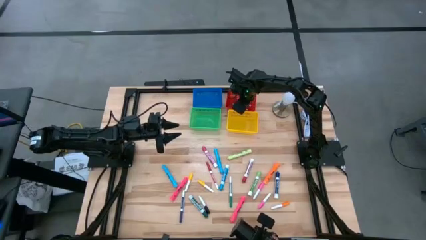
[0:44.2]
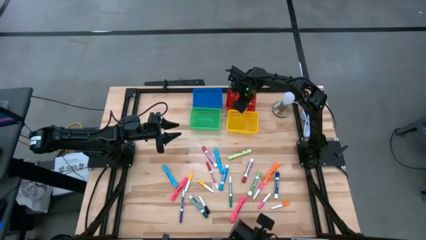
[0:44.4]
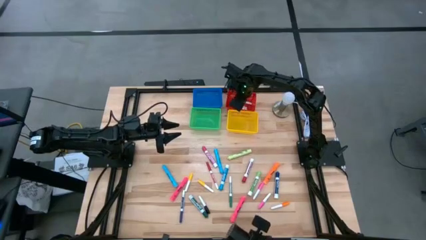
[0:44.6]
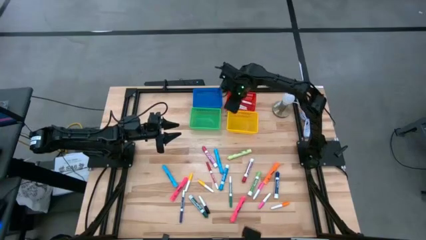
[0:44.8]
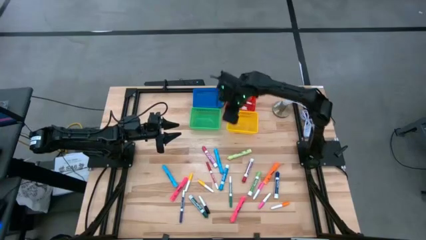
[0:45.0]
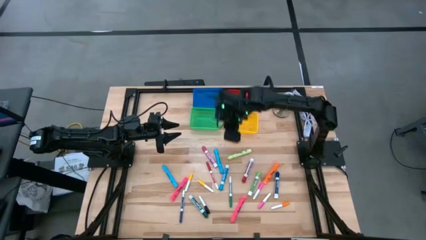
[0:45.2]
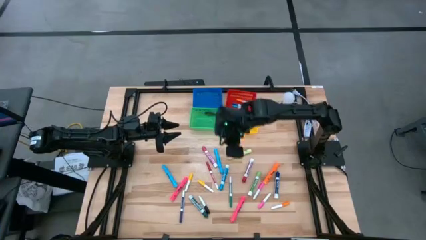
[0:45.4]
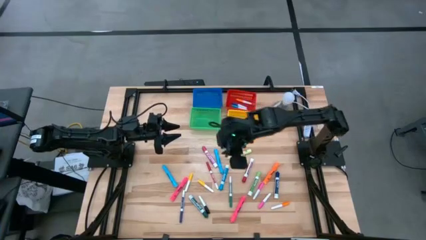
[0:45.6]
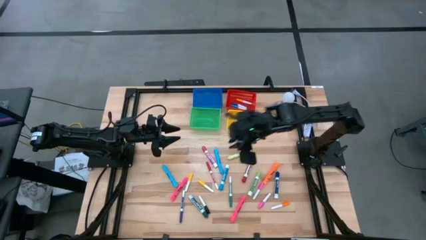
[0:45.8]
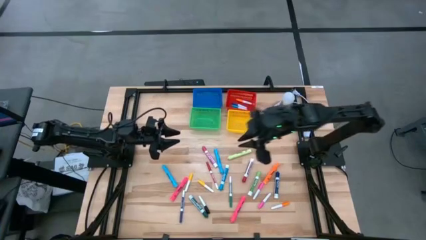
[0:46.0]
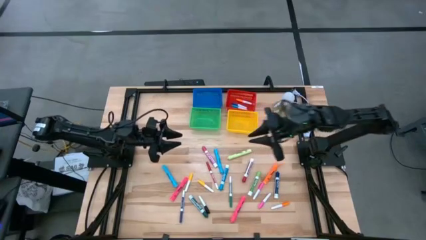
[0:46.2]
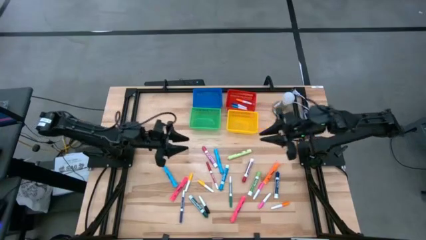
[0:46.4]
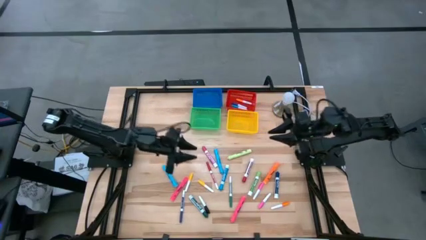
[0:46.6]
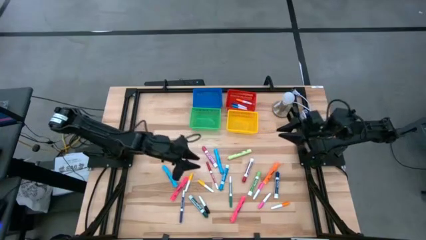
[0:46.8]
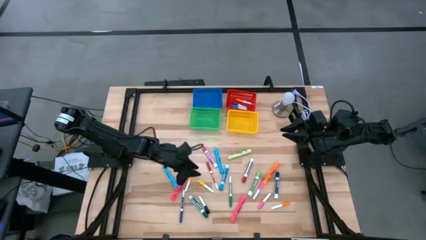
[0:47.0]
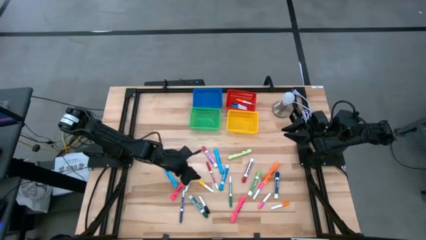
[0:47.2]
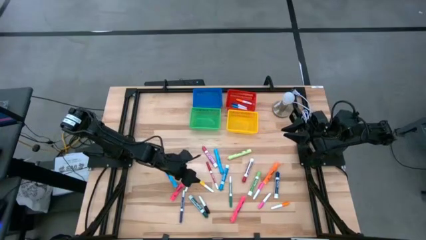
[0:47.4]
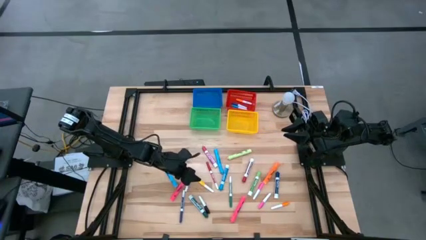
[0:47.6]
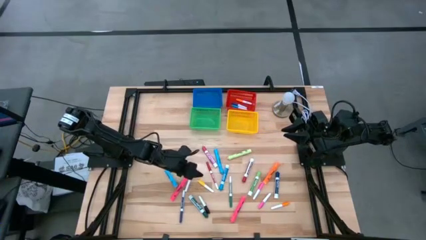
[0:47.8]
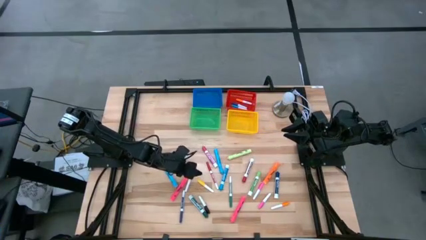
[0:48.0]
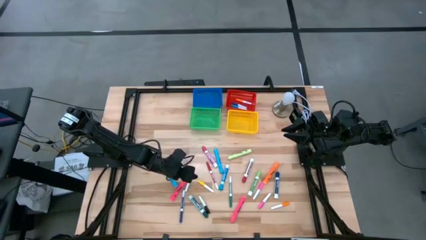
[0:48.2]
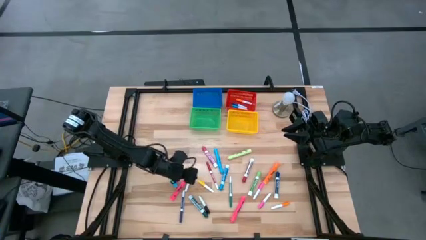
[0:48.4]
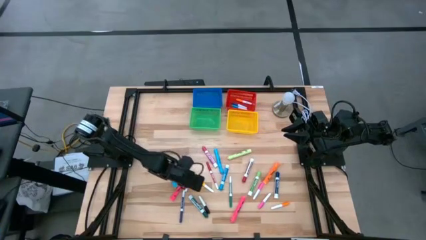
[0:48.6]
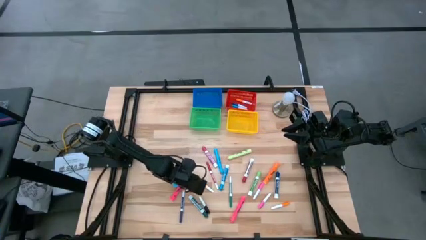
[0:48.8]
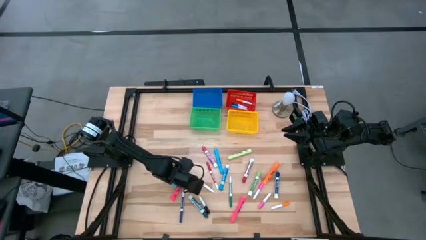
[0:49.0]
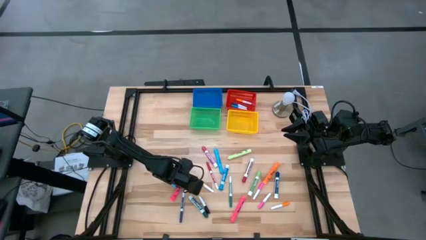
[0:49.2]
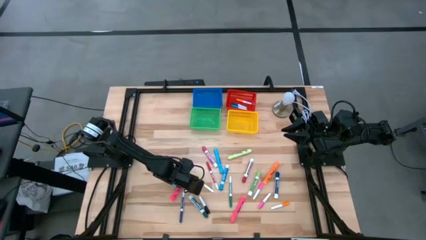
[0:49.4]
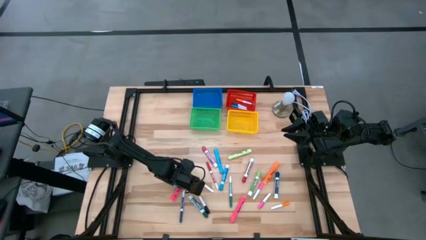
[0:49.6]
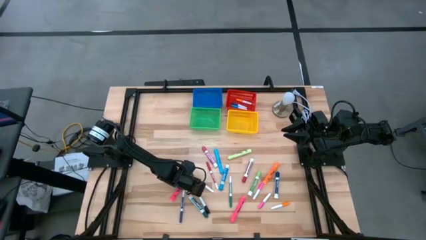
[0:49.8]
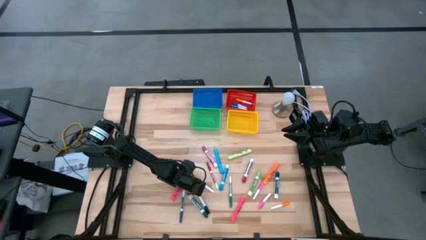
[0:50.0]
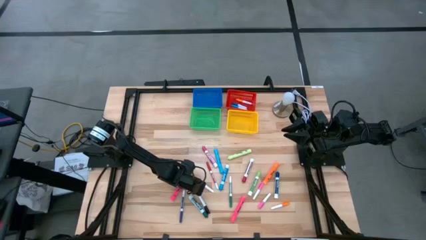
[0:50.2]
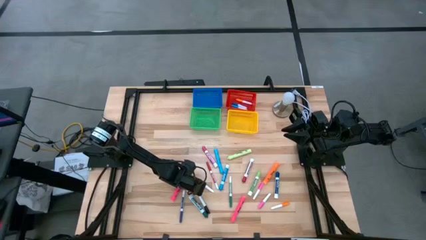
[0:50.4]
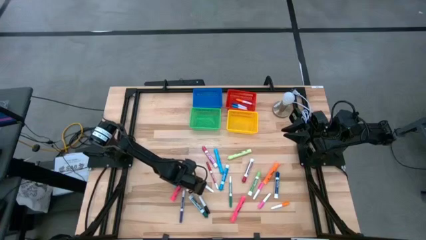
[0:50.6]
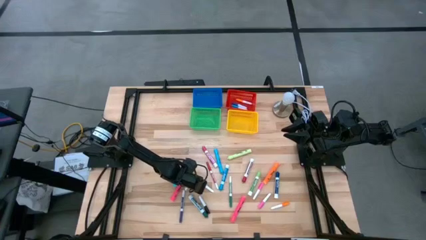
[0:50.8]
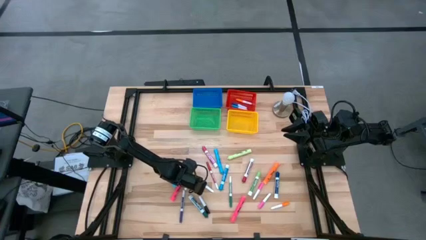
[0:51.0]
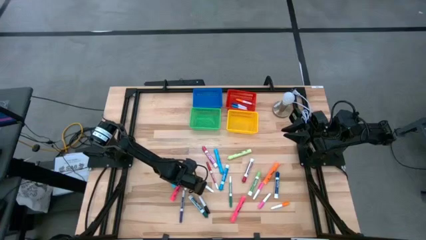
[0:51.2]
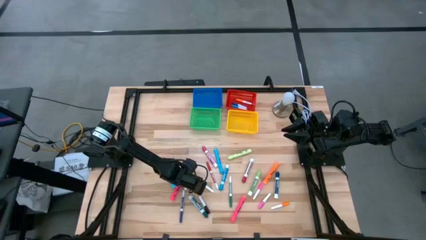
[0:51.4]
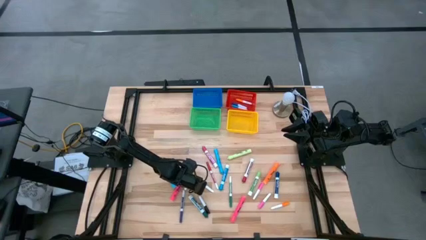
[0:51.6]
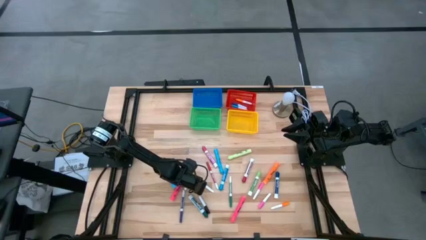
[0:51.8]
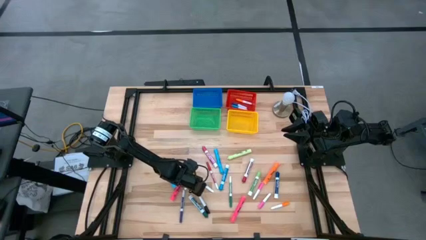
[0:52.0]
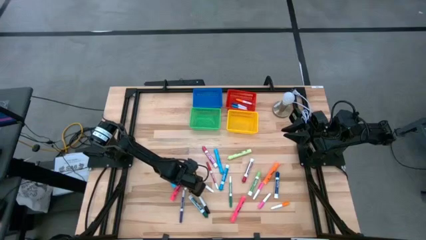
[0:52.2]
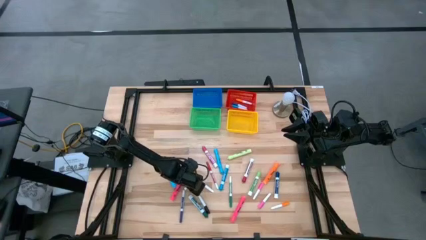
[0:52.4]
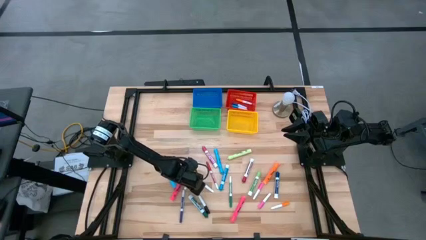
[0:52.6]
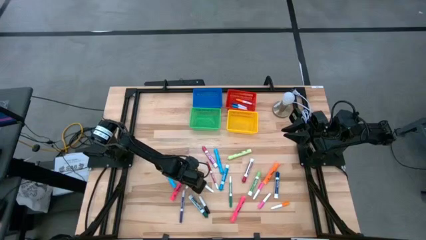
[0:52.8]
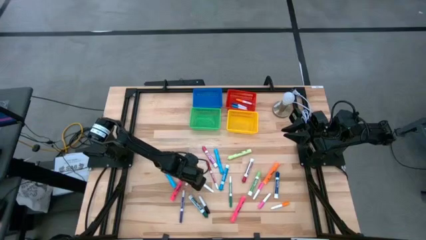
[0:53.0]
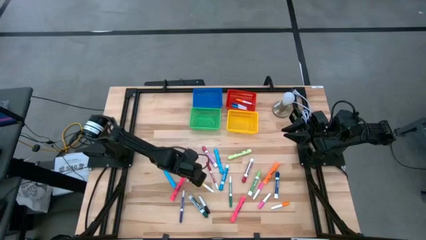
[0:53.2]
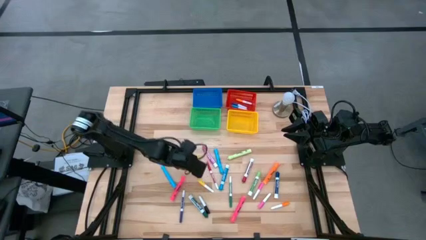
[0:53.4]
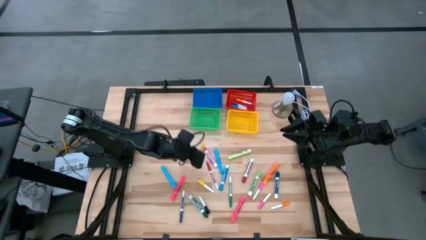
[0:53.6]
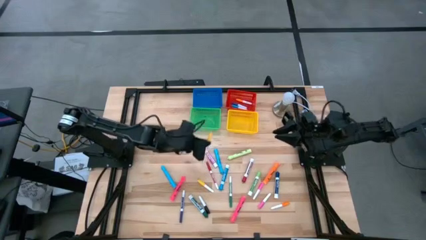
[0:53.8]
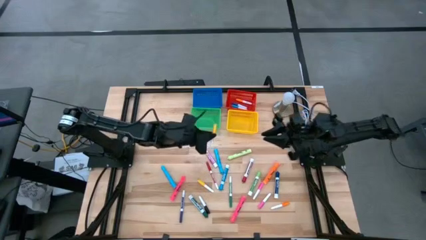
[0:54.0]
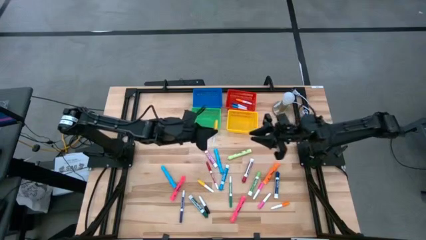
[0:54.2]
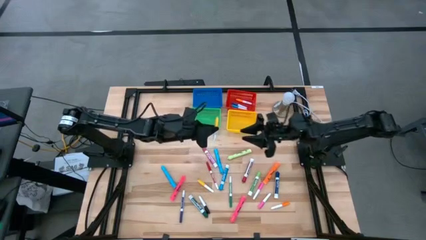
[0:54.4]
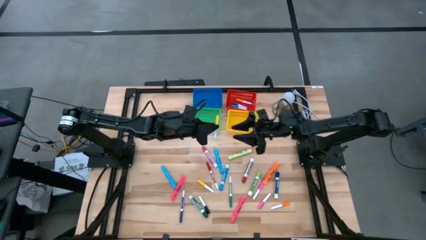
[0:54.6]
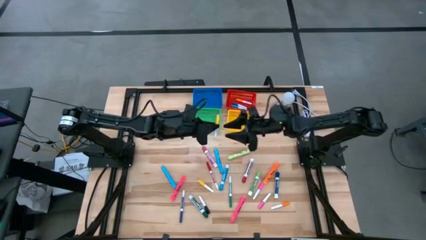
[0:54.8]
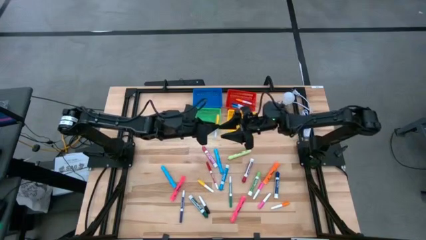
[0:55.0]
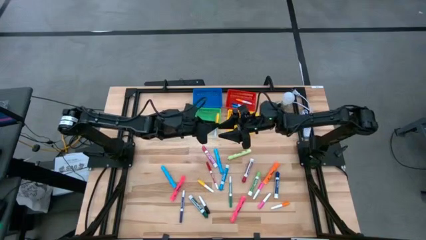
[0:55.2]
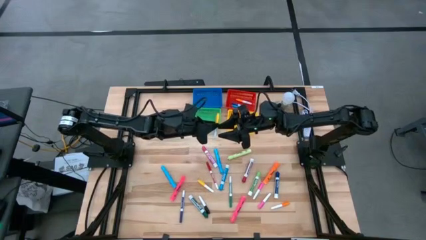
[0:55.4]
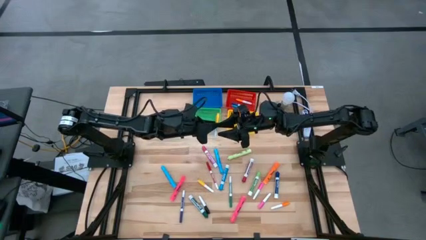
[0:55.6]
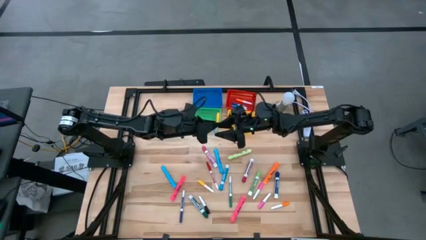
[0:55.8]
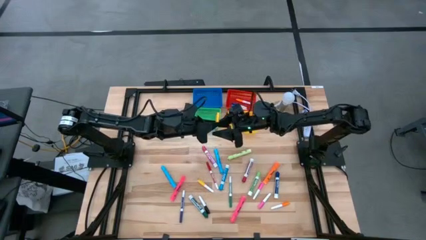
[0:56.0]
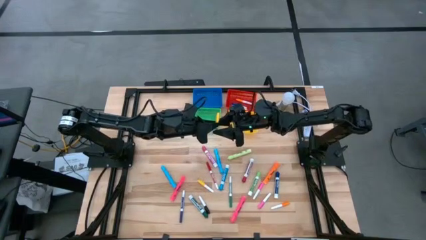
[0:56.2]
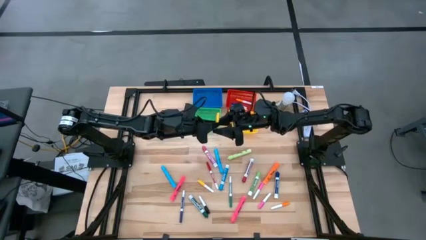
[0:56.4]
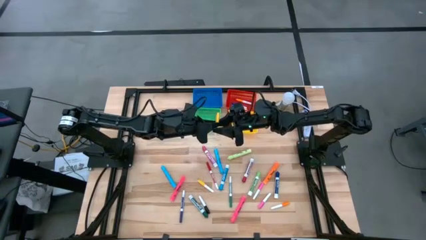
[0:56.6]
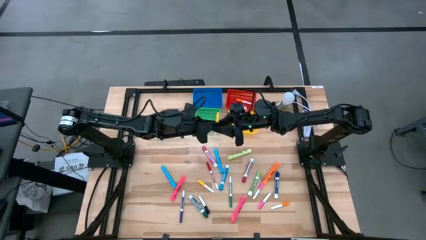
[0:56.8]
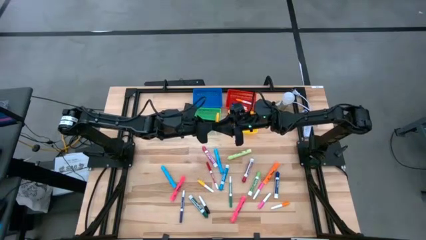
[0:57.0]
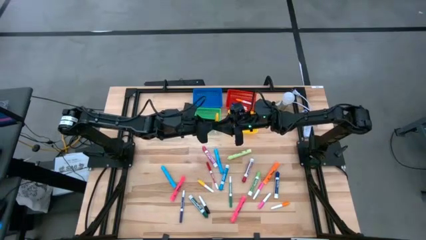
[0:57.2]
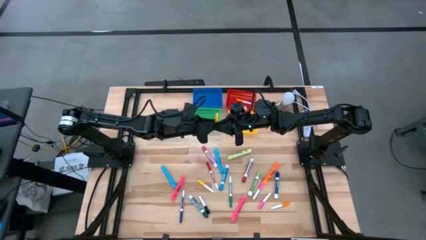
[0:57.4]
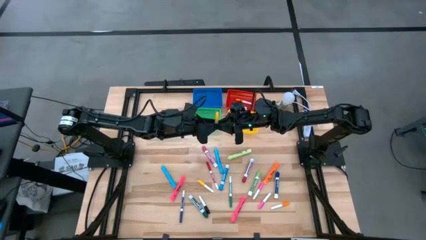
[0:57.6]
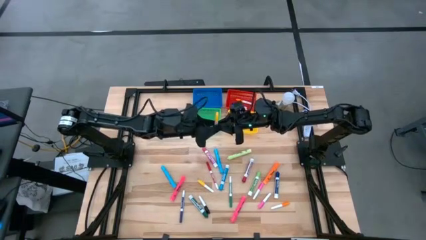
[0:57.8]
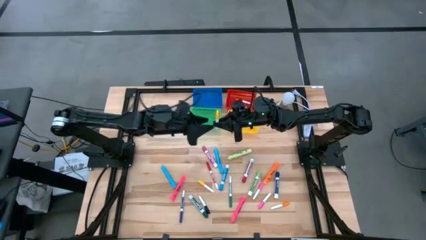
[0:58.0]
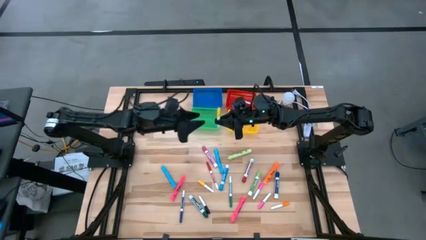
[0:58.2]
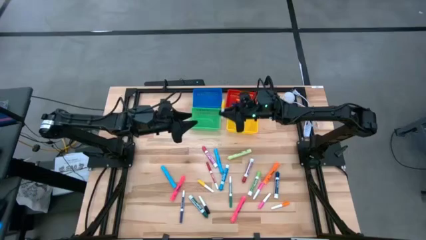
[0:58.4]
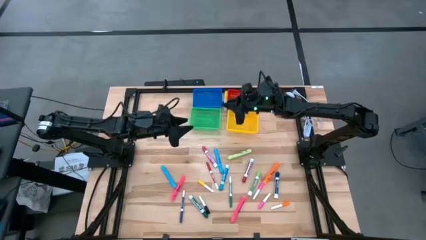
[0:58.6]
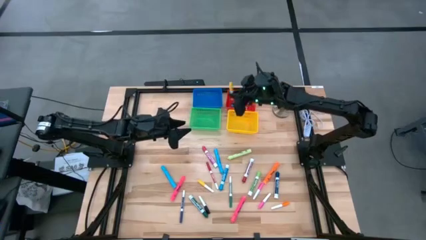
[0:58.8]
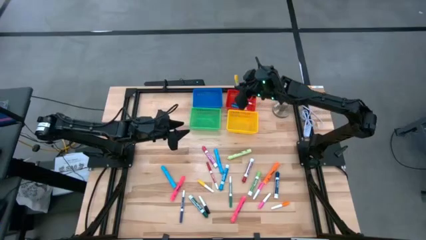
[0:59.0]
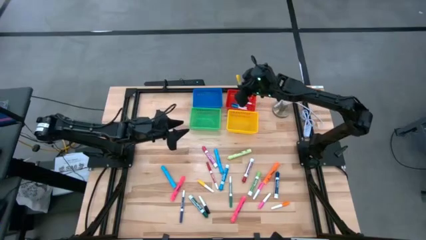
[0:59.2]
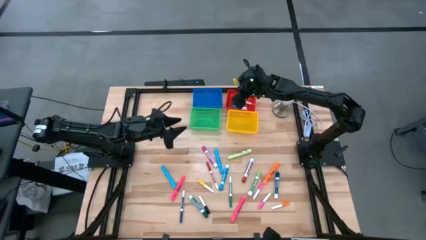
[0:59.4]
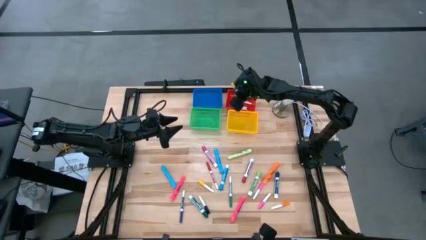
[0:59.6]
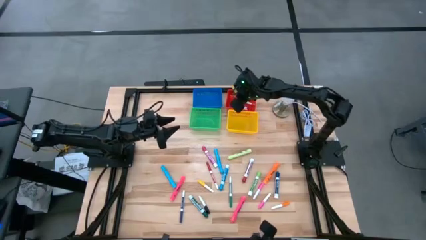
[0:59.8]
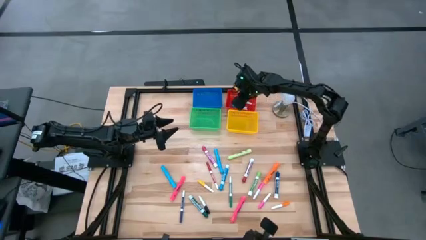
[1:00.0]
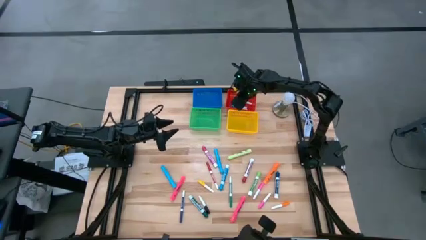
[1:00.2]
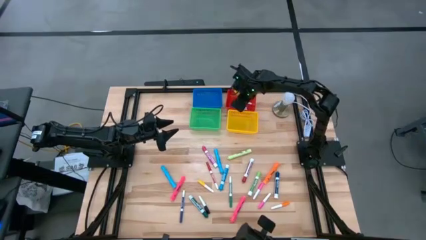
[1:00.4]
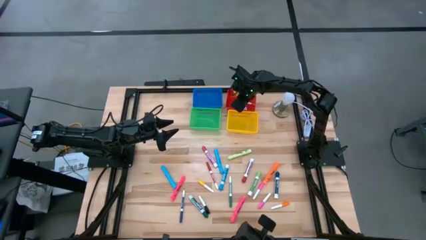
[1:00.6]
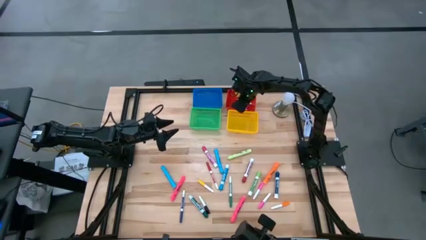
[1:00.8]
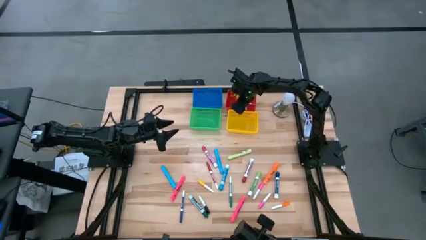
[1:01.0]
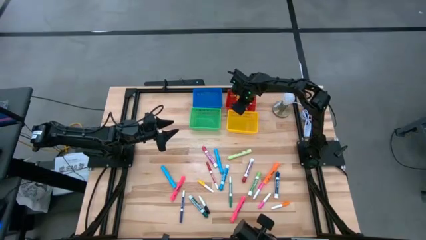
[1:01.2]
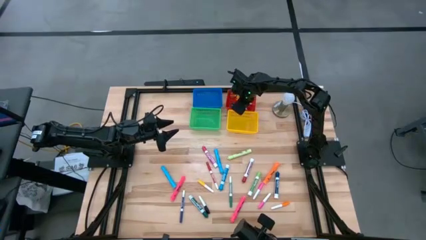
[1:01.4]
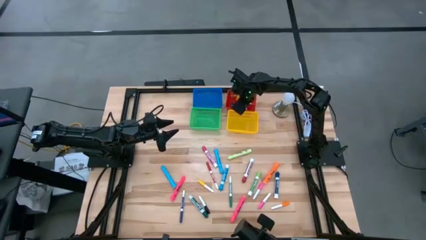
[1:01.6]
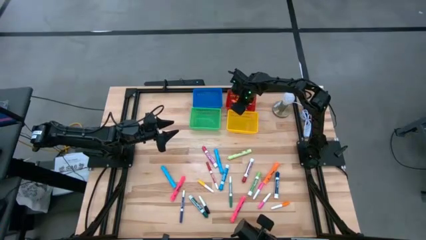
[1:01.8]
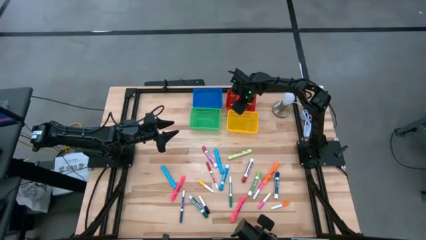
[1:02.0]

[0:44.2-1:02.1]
Task: Pick & Place Markers
Put the left yellow pen into the red basket
